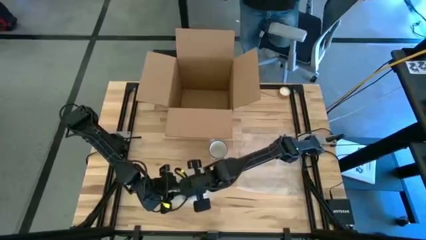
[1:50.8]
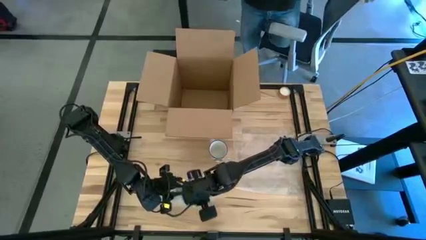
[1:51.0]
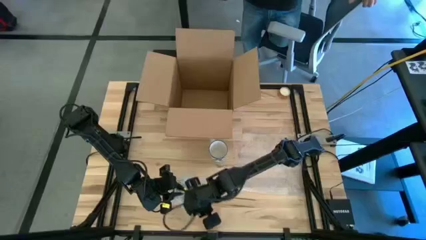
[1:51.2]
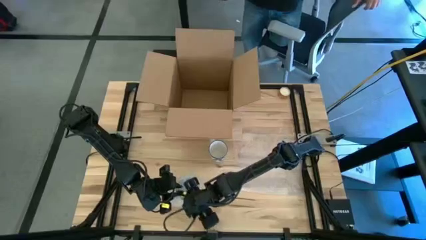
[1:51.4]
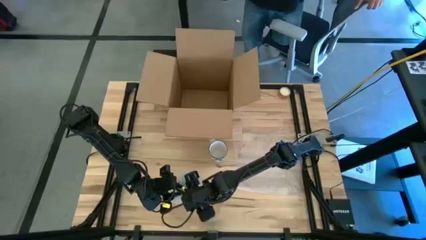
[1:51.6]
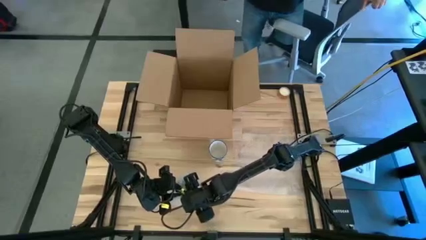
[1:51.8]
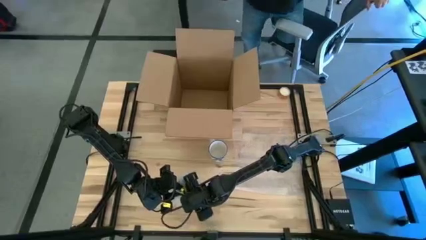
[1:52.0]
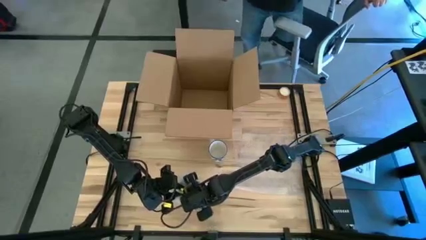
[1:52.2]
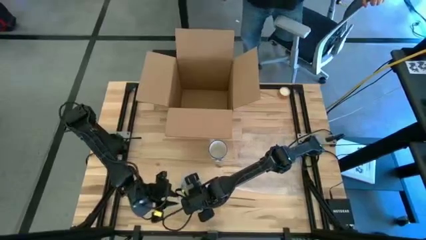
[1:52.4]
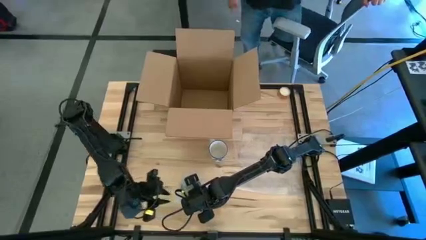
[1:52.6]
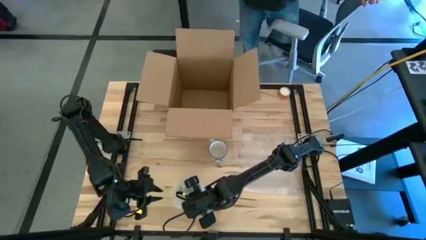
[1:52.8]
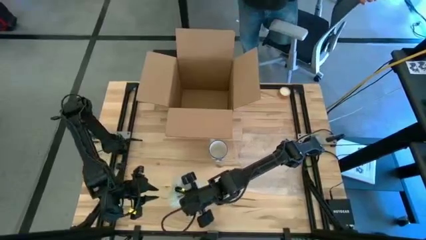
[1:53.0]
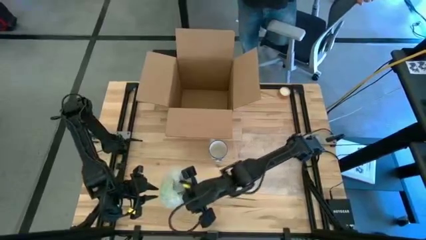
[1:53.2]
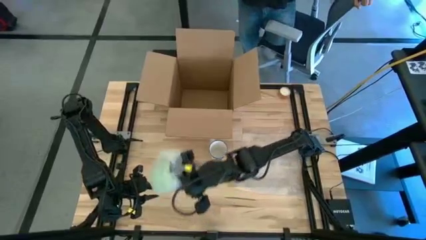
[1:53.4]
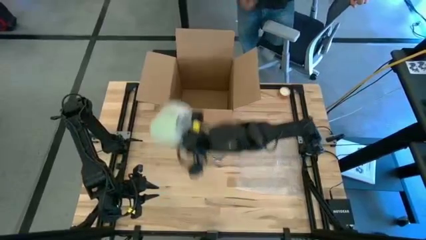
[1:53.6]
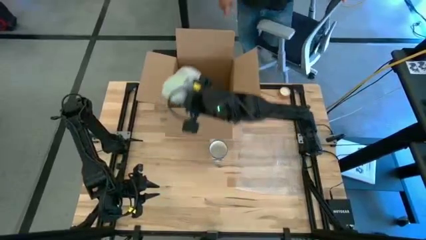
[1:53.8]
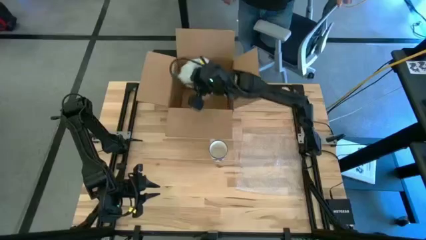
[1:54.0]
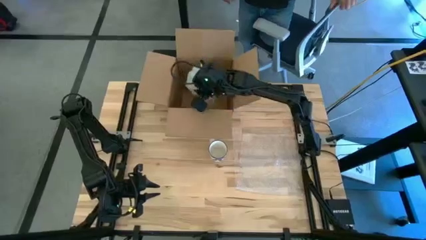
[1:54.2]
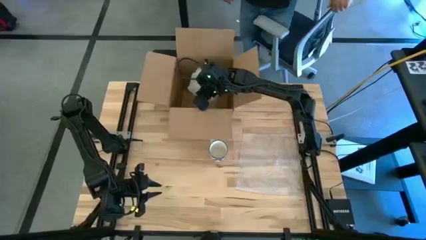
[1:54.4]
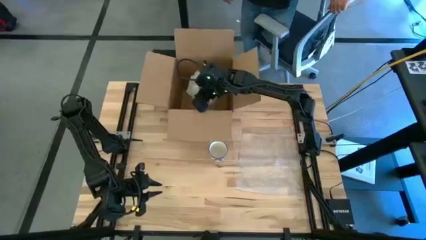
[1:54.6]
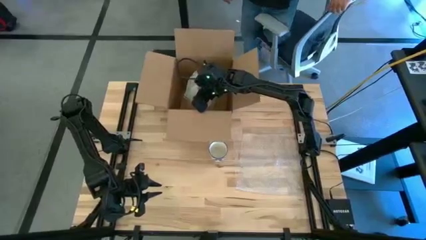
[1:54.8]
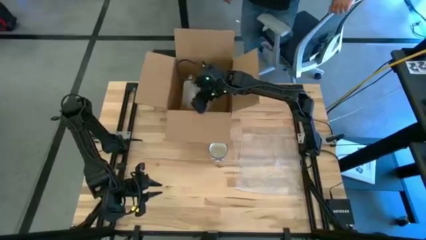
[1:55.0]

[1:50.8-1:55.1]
Task: wrap mug
Put the wrapped green mug into the box

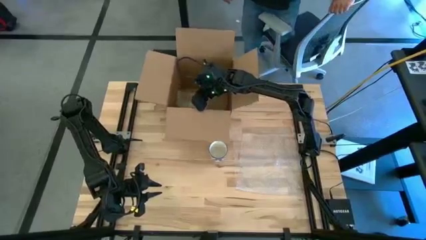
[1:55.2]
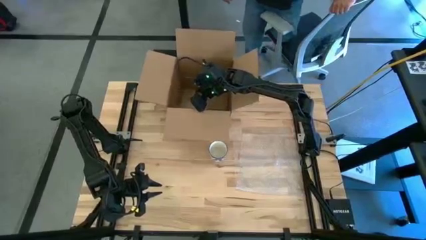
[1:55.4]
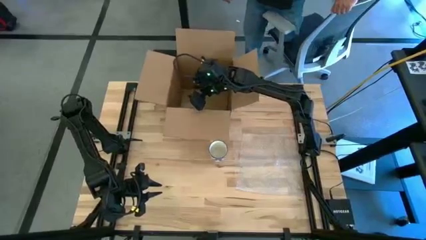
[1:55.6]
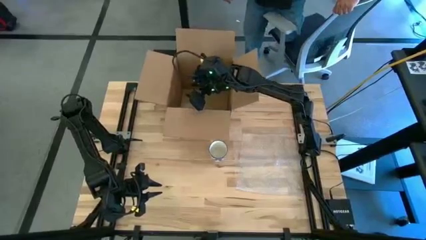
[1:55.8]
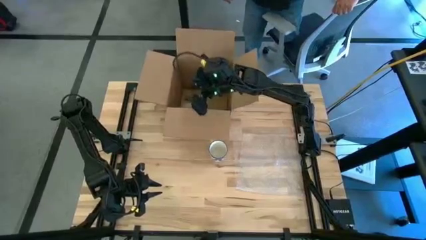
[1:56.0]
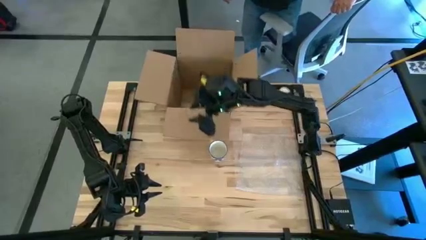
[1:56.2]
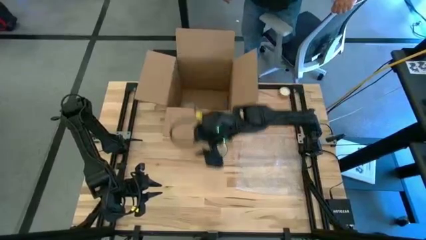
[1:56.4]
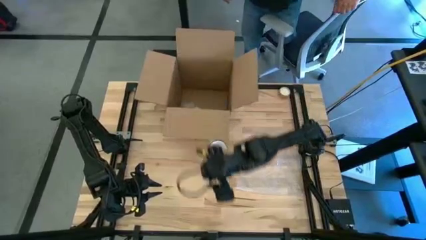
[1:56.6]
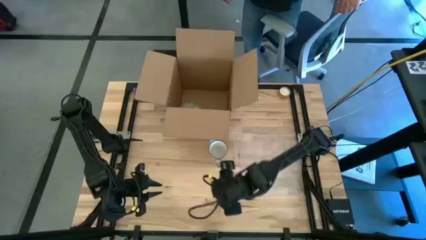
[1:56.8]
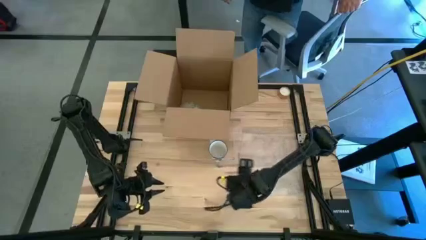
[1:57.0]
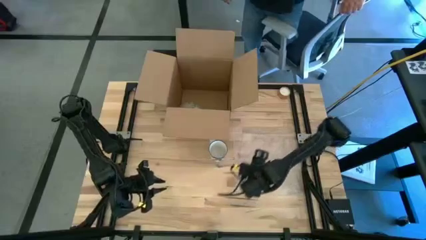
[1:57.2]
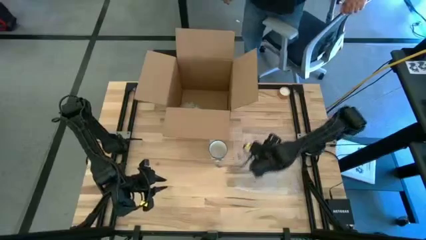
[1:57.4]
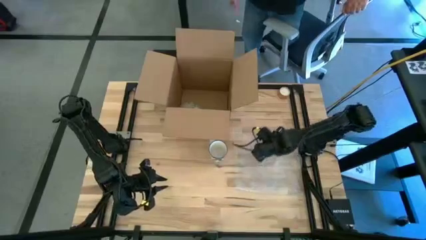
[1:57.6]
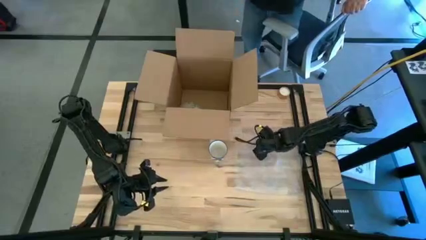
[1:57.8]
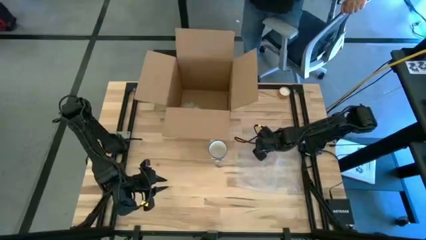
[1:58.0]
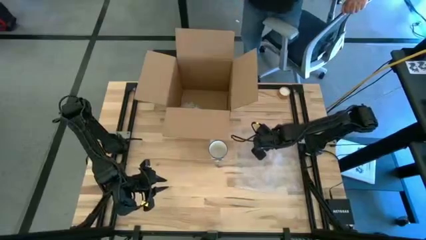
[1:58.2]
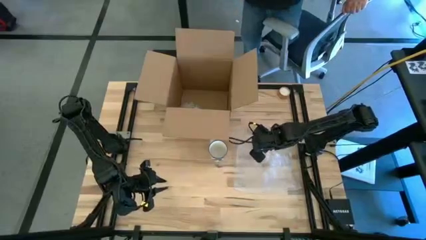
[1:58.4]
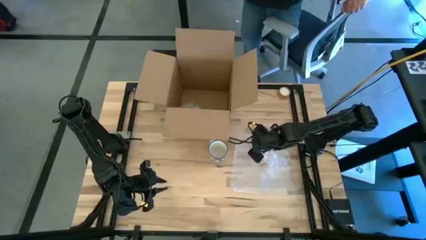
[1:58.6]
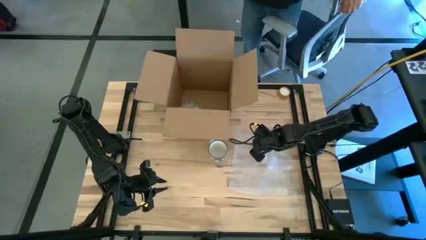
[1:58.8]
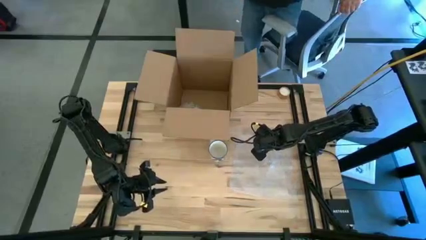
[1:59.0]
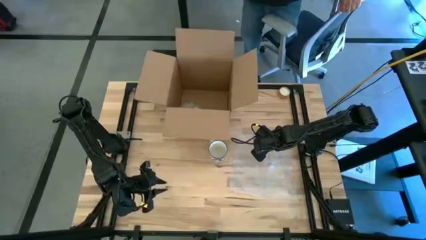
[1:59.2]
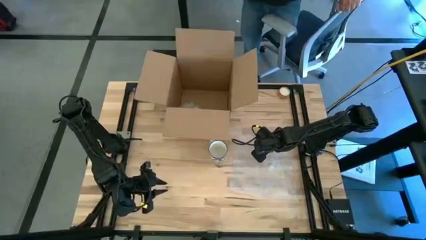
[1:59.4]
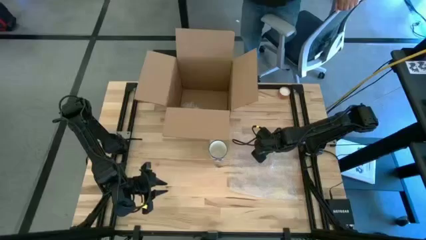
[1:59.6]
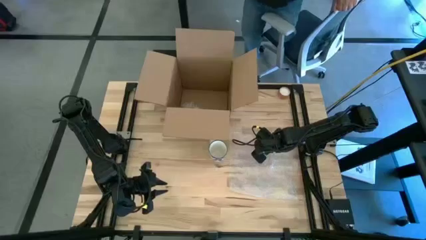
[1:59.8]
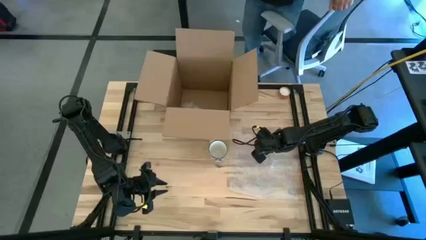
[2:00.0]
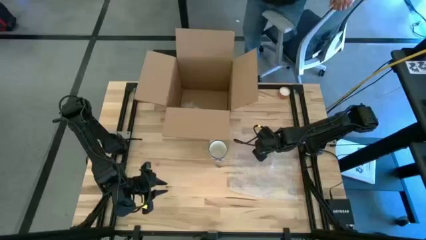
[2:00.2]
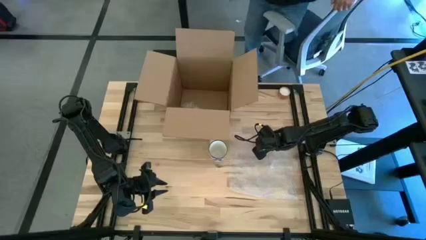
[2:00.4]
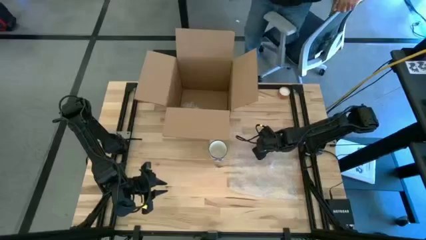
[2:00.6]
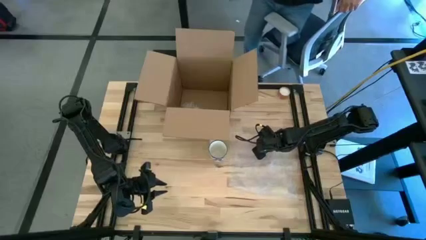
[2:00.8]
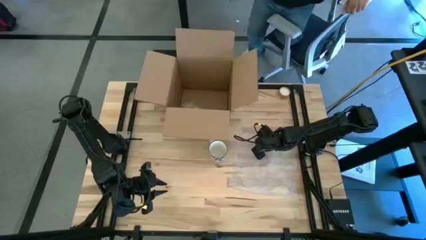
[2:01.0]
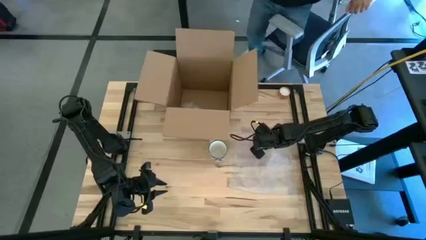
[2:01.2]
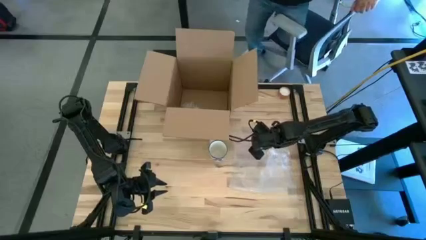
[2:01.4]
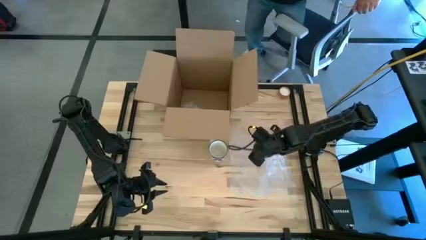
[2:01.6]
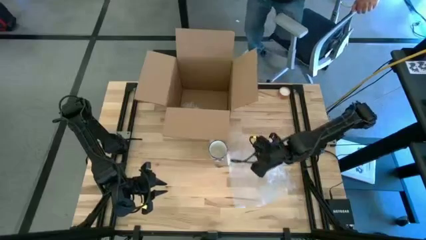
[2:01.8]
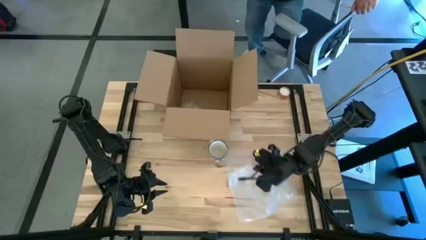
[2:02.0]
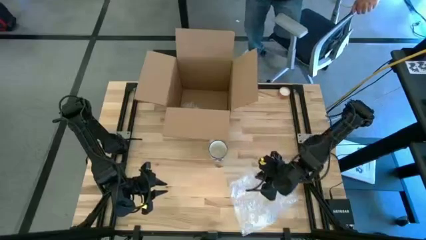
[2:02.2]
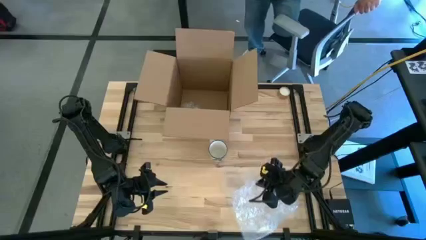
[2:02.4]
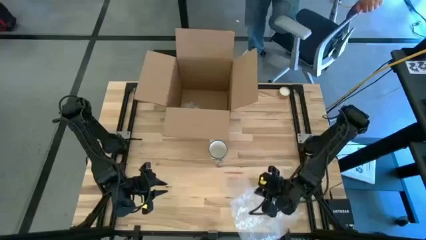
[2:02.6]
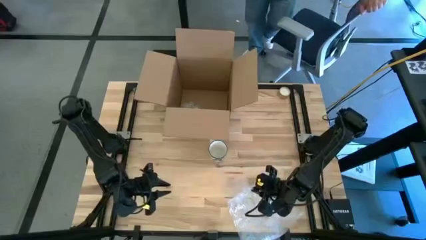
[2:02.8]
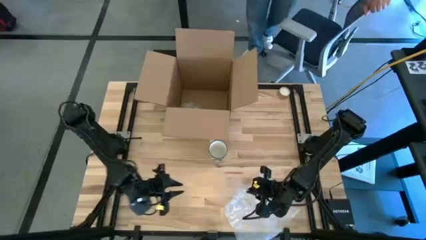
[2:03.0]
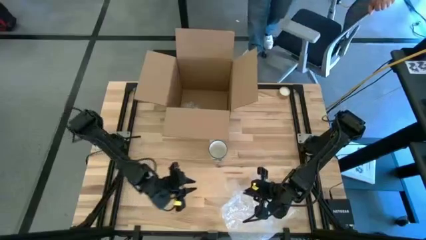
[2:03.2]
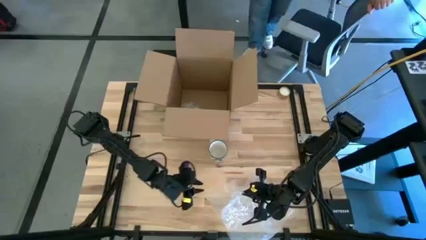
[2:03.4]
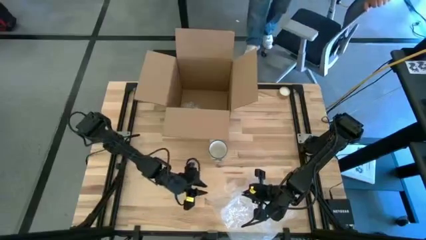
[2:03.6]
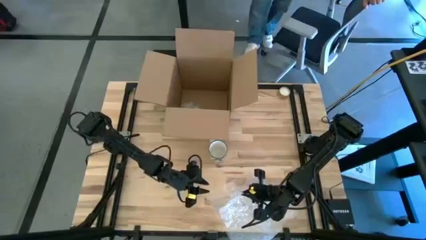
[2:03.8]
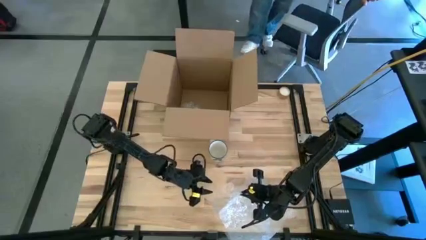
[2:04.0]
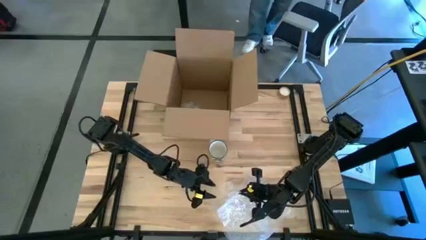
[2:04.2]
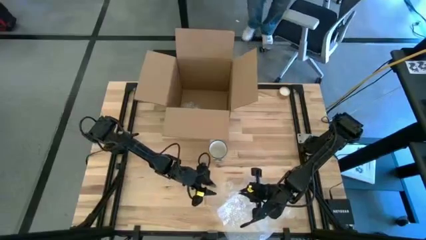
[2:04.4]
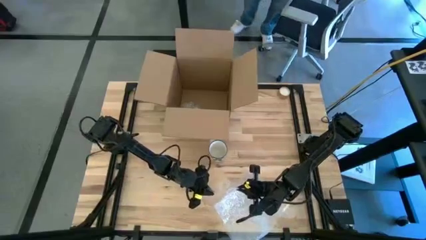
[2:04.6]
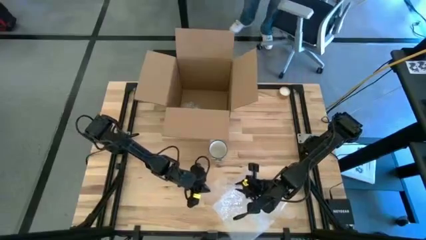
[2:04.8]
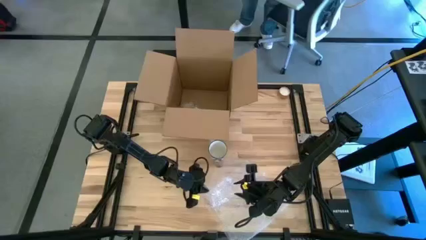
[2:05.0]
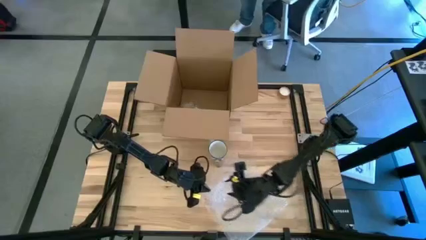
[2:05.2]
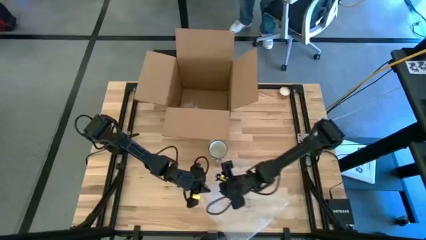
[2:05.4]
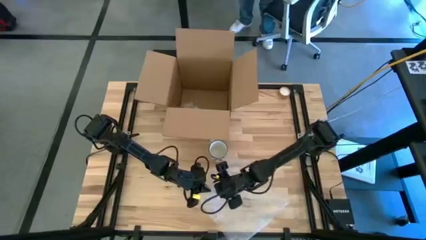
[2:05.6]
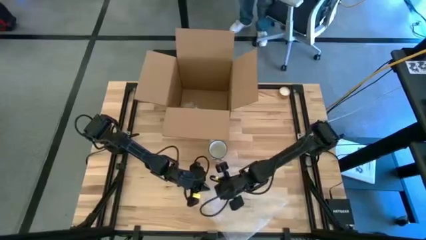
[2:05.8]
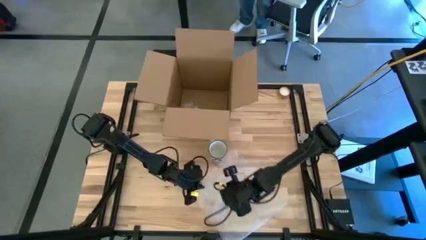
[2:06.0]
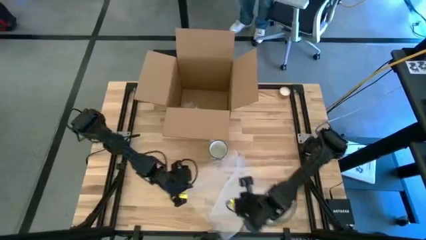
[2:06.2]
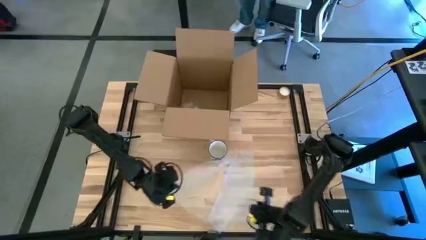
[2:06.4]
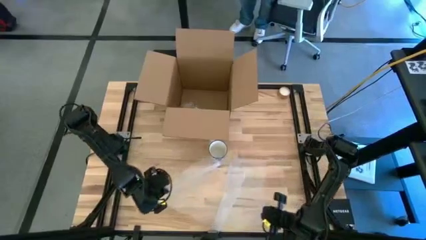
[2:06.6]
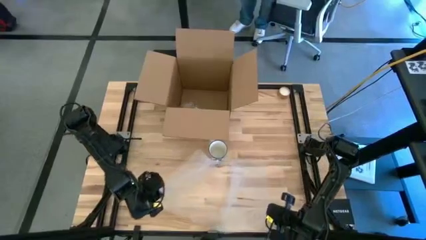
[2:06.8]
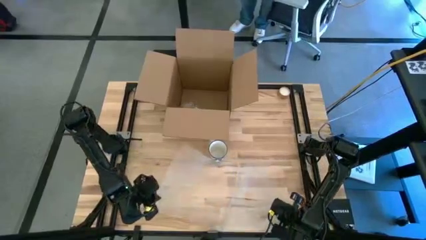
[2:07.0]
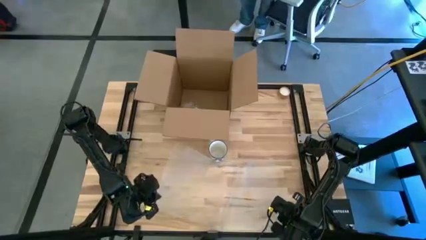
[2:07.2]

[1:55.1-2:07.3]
Prepare the transparent bubble wrap
